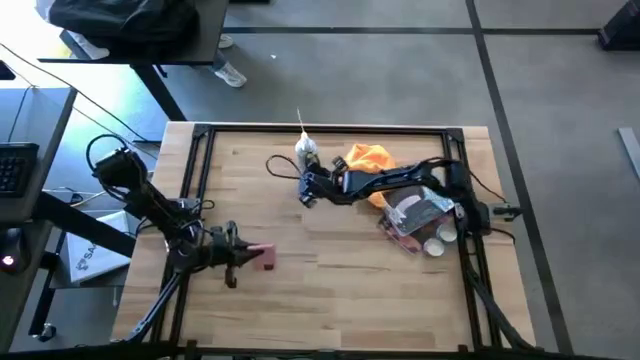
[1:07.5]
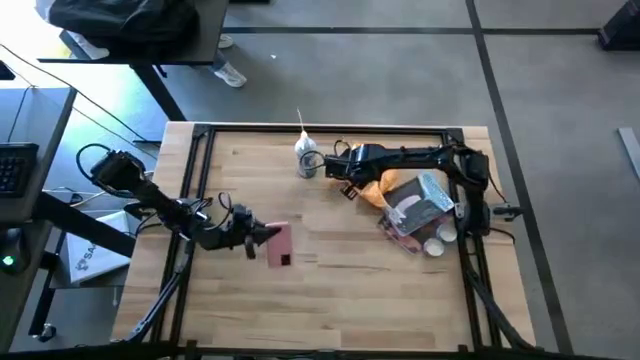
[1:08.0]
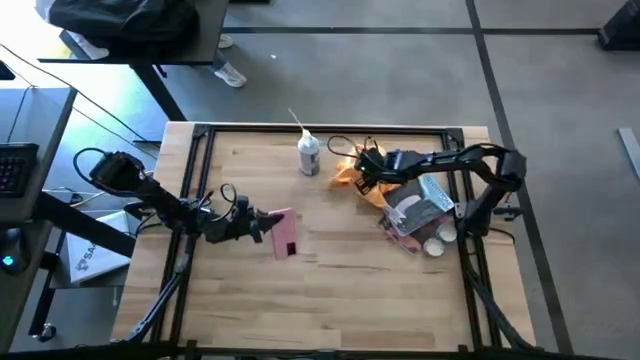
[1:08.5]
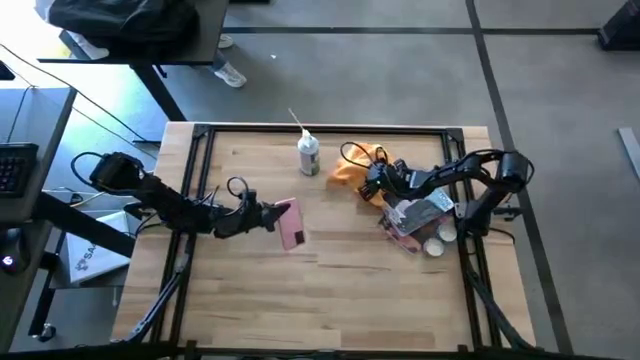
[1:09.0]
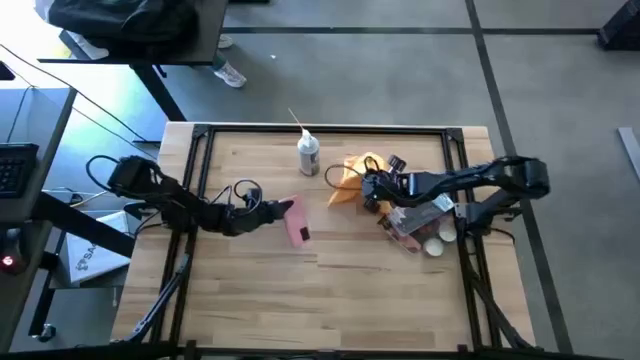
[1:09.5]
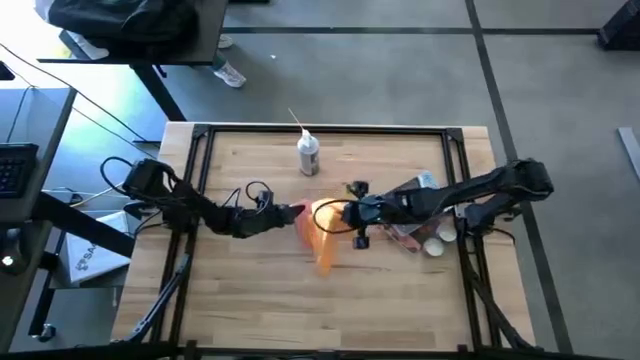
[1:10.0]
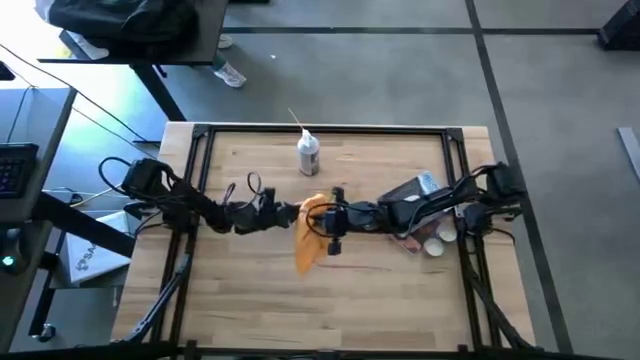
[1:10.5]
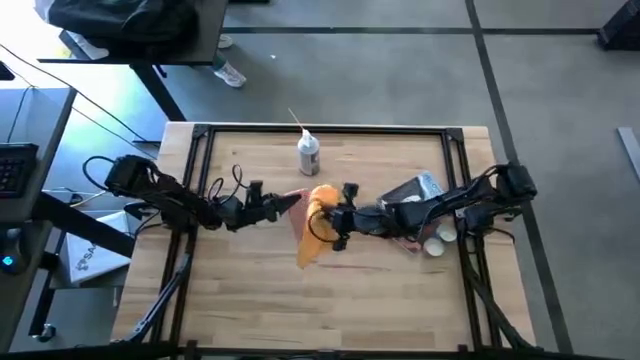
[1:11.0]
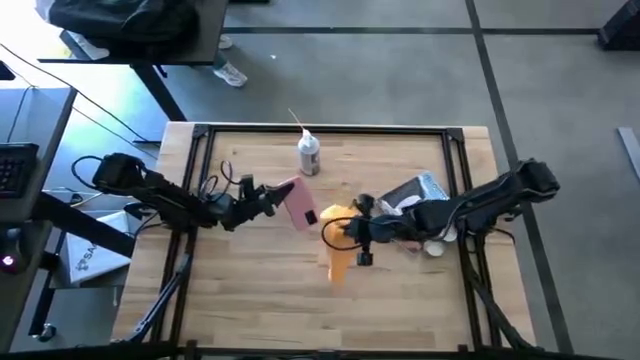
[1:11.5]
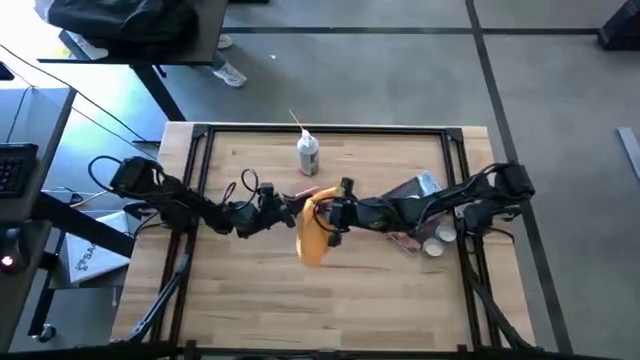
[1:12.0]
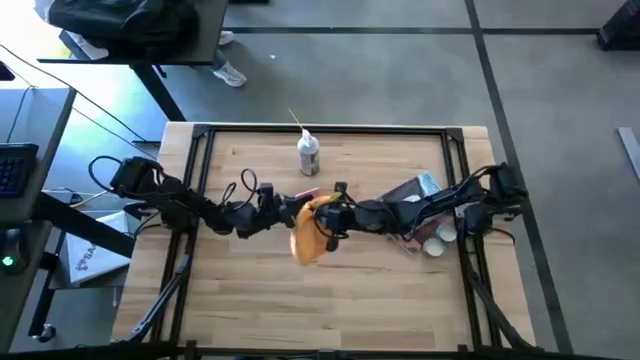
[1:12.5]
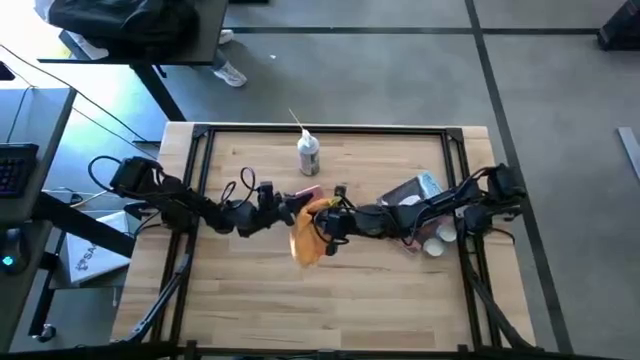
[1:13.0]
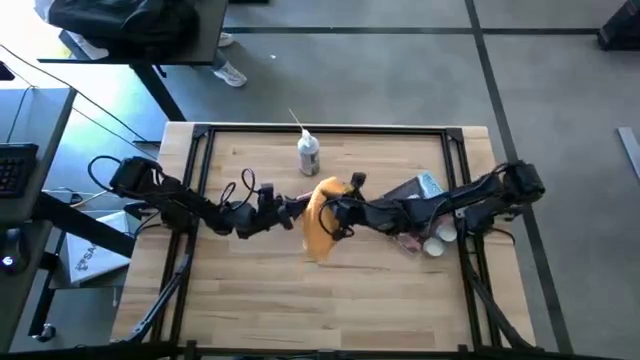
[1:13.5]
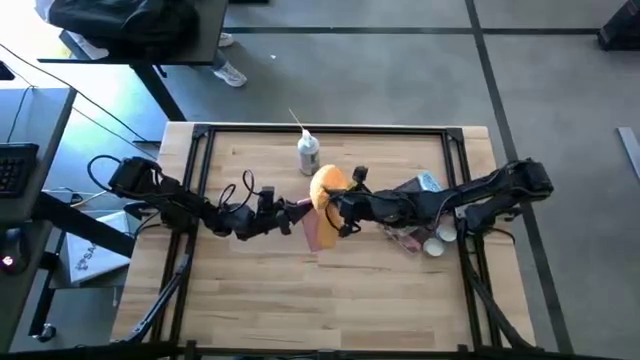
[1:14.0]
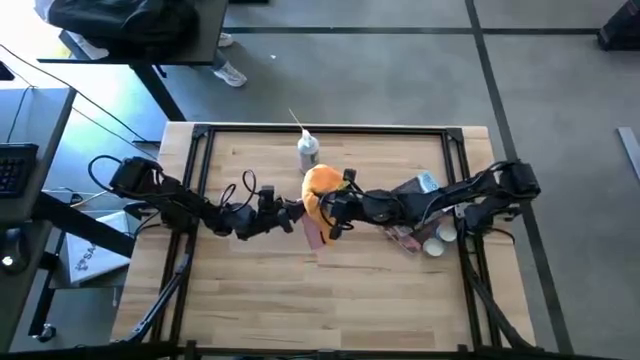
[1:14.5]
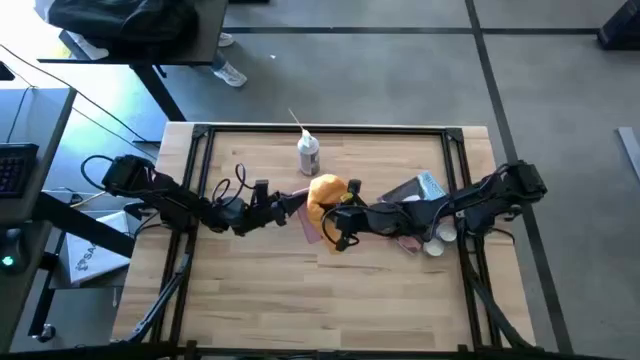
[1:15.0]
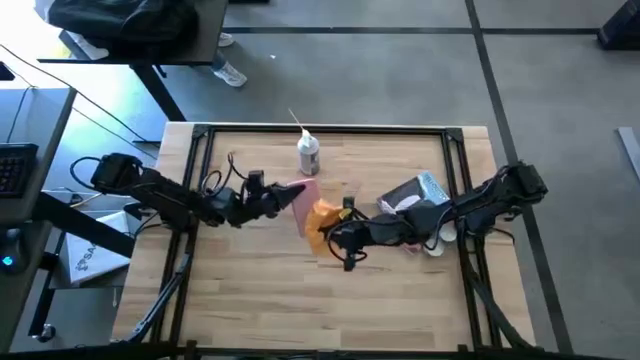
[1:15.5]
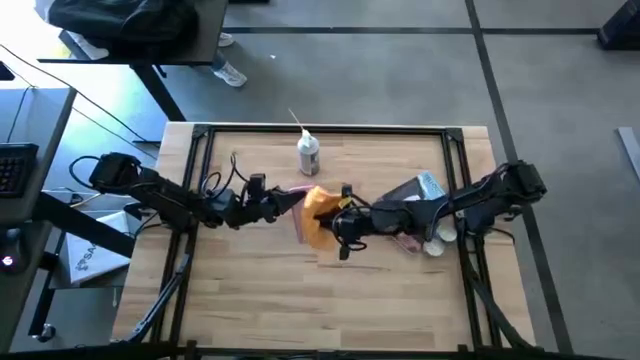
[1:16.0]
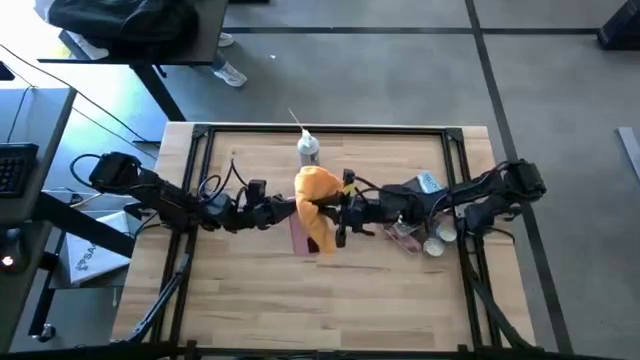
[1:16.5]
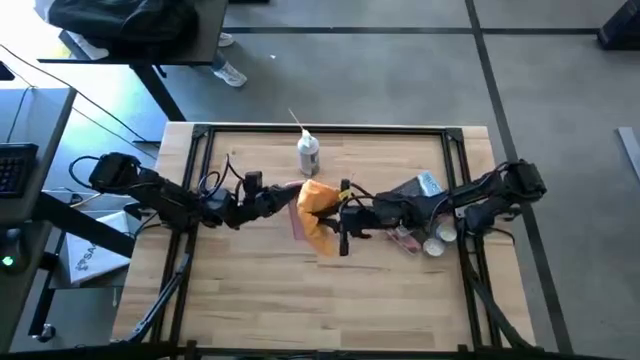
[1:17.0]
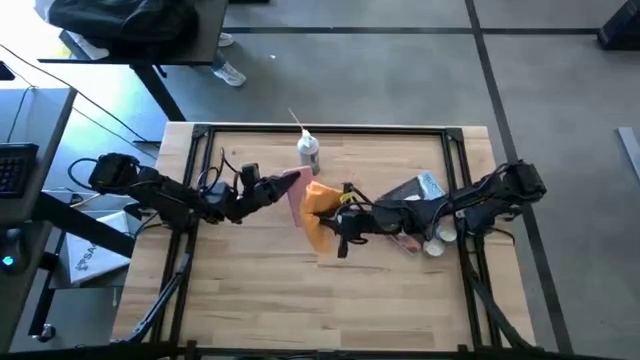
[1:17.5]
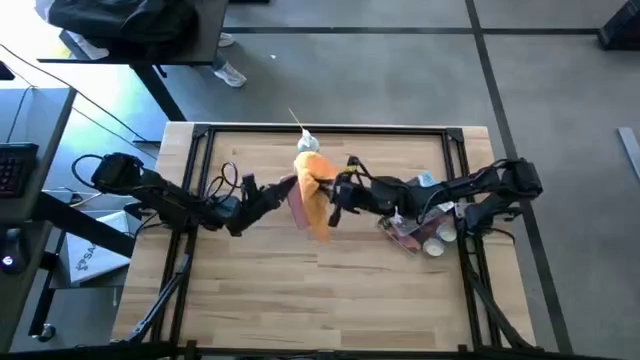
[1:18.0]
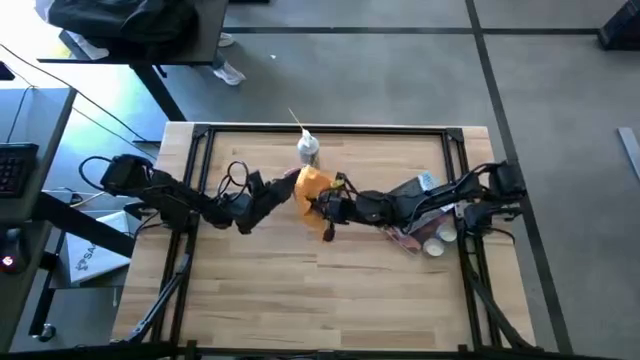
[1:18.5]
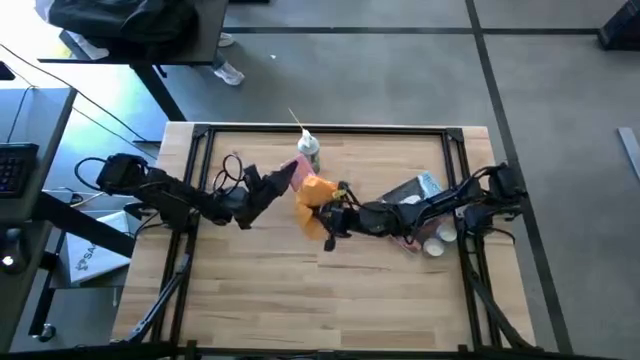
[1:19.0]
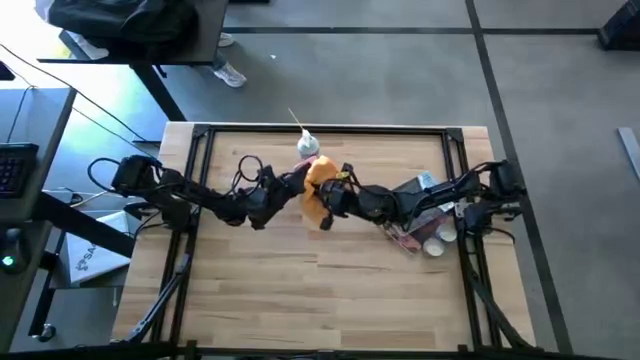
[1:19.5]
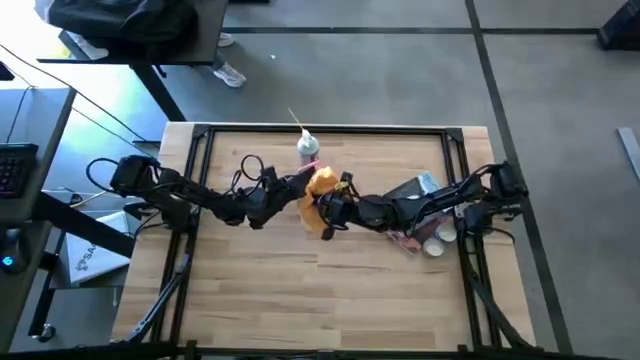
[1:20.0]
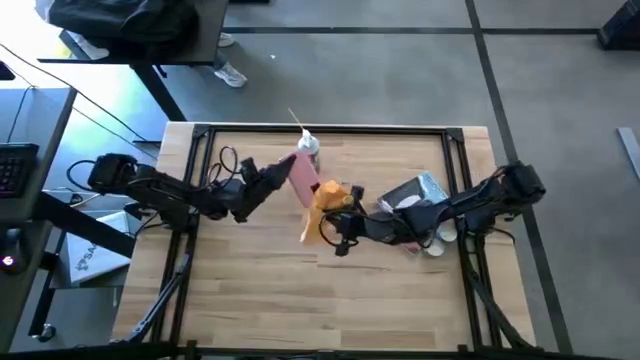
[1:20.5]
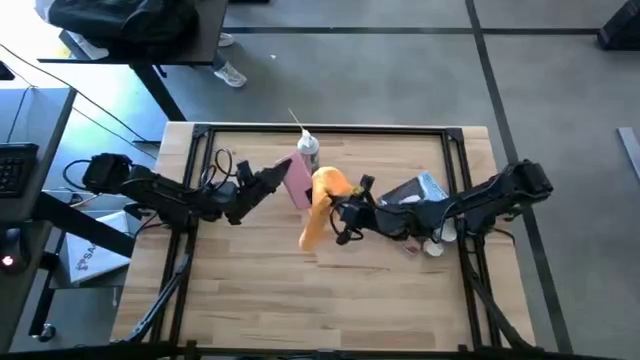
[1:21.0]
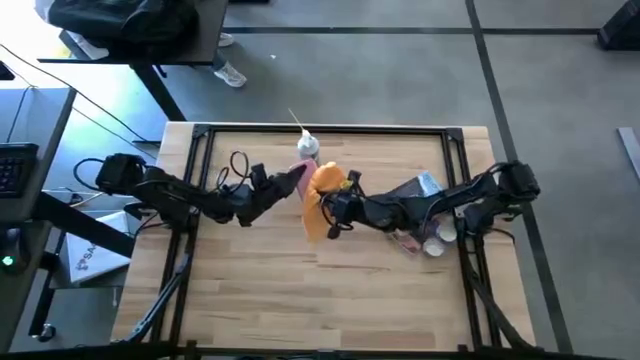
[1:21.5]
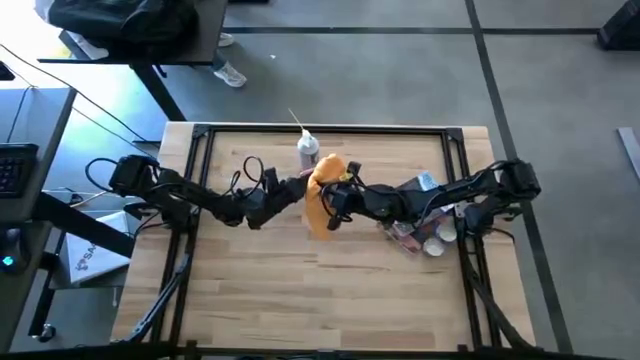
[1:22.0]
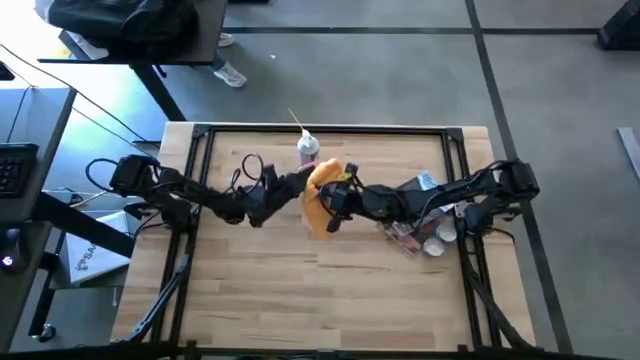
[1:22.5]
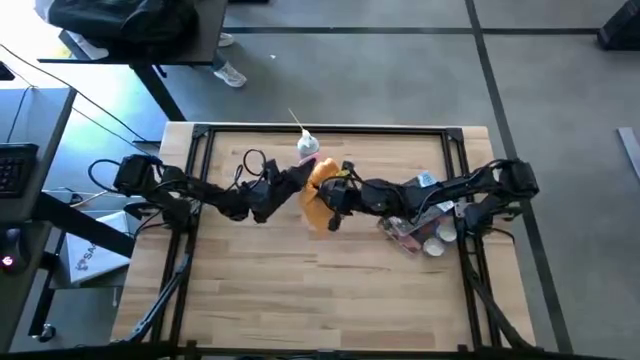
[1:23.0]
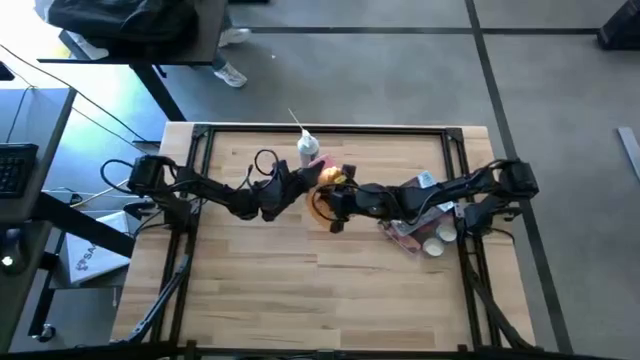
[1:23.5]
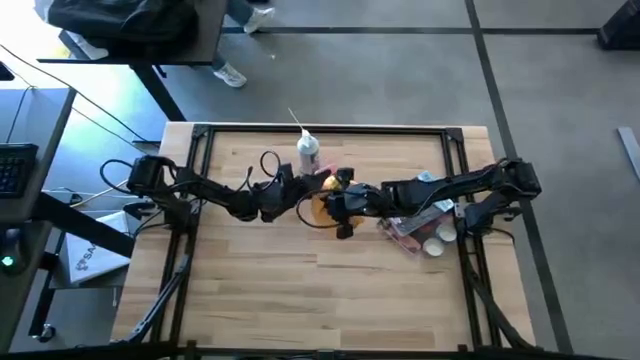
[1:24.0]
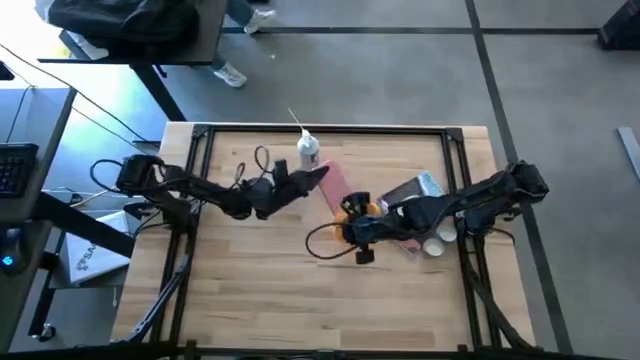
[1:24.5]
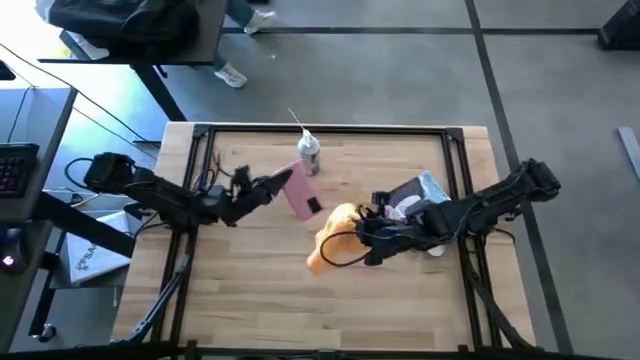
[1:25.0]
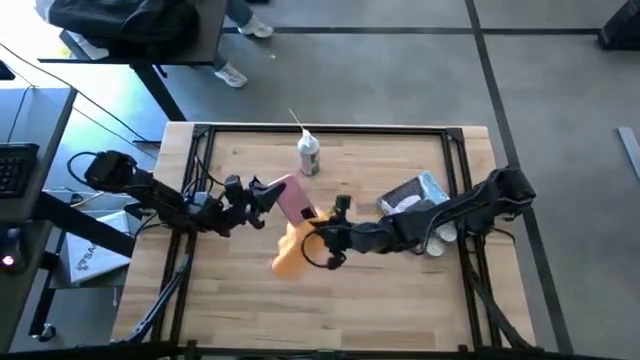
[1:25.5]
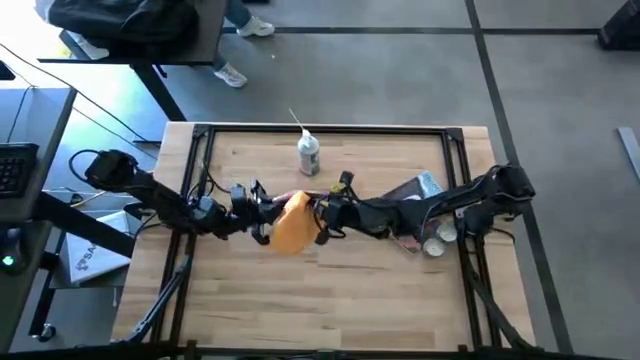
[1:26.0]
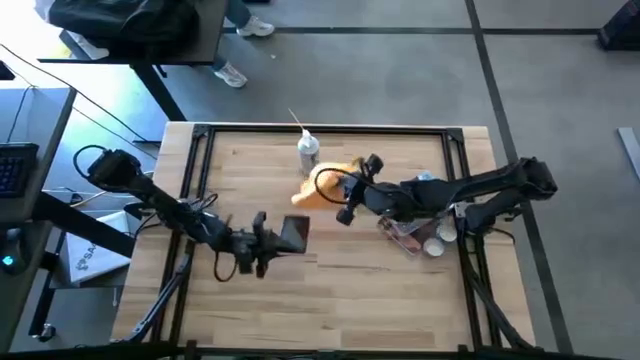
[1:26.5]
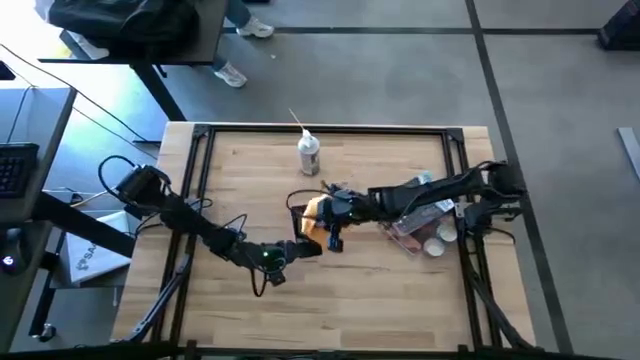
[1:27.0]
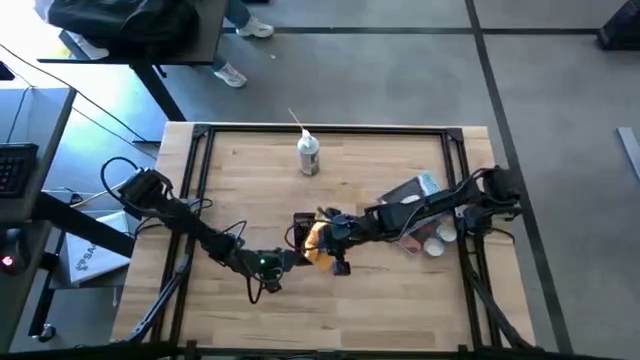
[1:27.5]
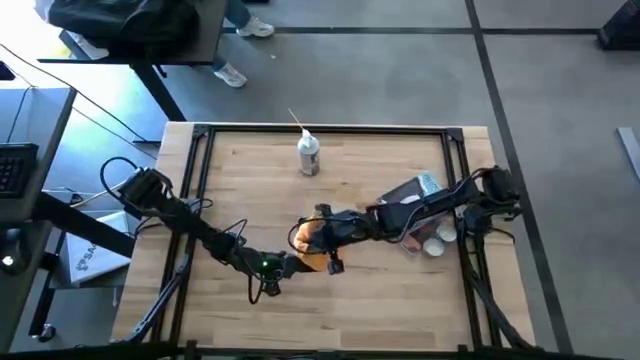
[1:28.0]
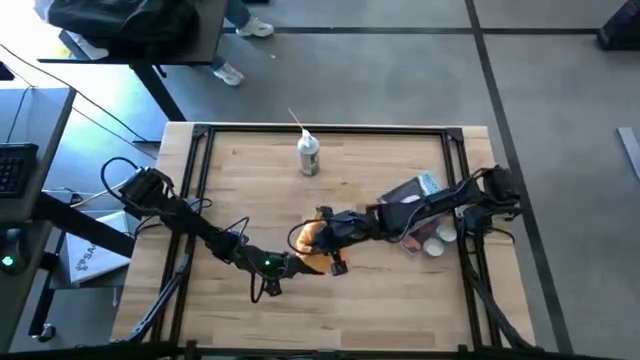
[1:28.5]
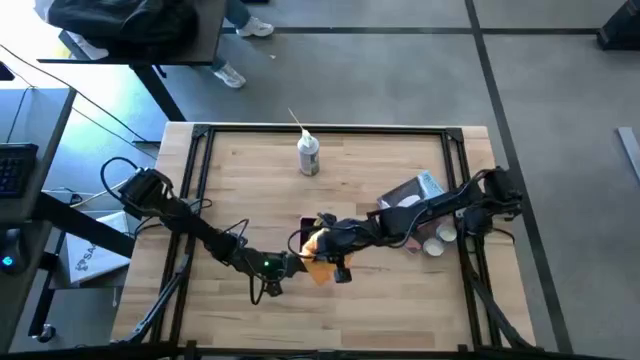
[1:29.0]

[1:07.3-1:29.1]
Task: Apply microfiber cloth
Wipe the back and front of the cellphone using the orange microfiber cloth
